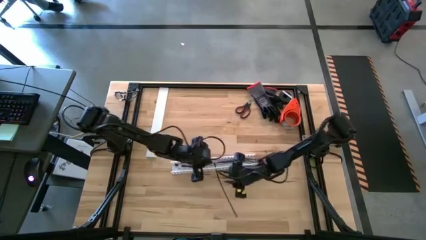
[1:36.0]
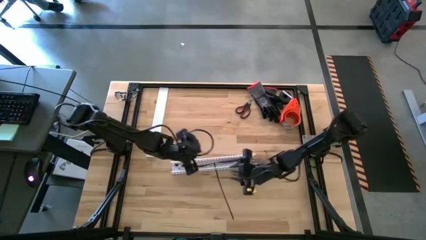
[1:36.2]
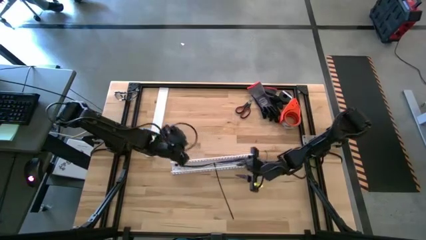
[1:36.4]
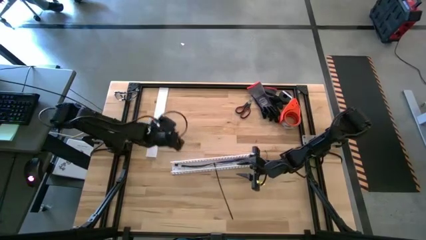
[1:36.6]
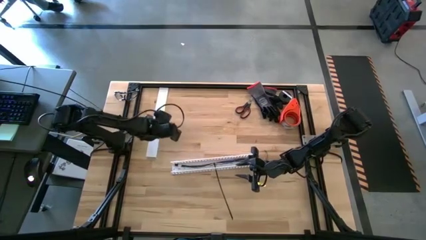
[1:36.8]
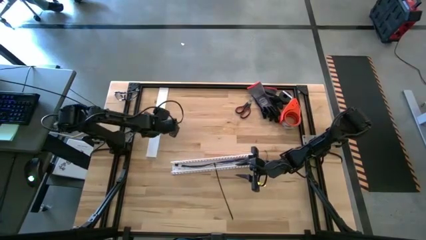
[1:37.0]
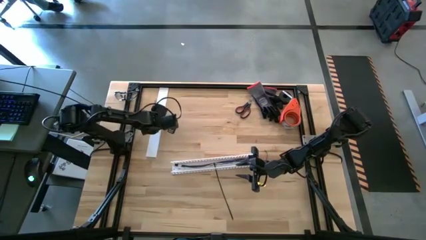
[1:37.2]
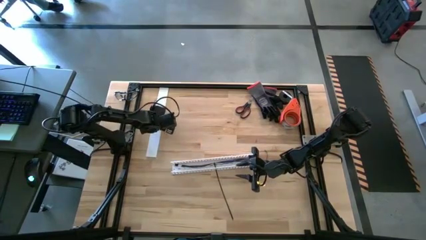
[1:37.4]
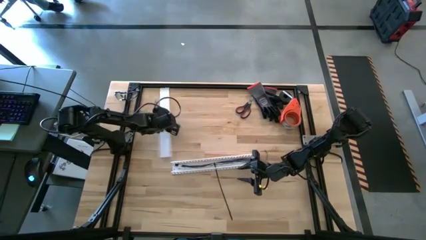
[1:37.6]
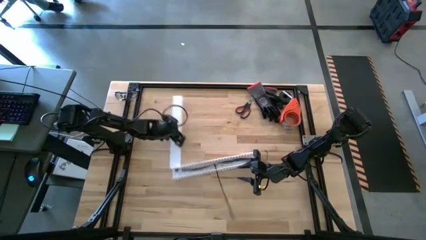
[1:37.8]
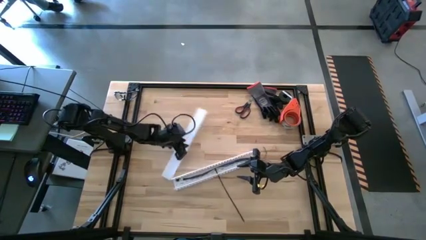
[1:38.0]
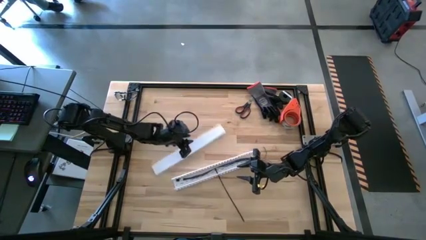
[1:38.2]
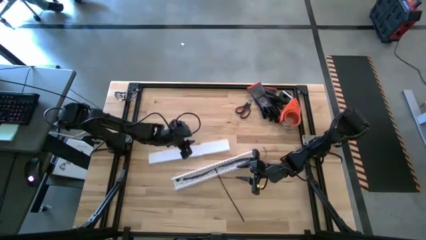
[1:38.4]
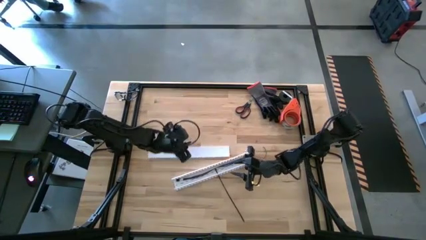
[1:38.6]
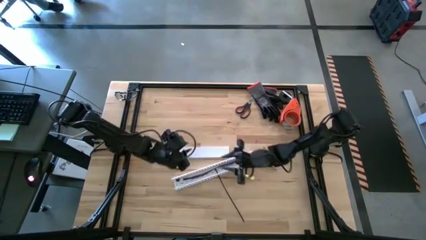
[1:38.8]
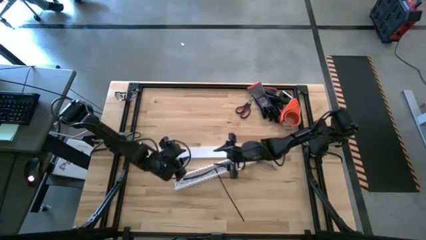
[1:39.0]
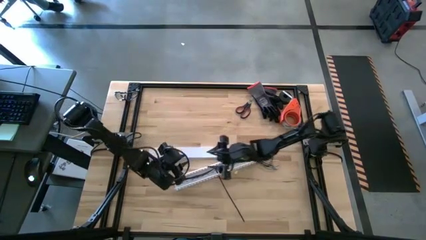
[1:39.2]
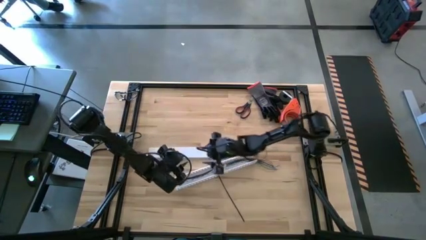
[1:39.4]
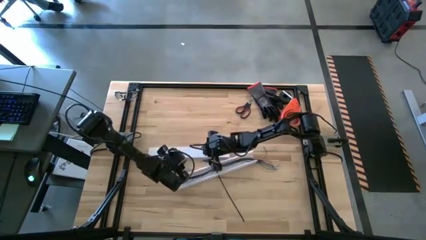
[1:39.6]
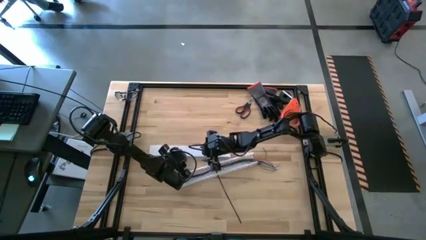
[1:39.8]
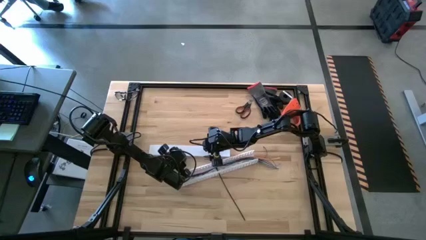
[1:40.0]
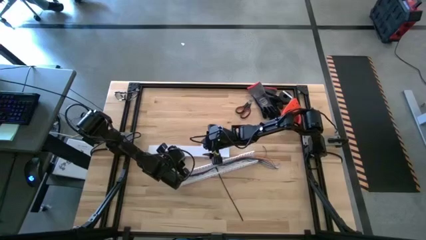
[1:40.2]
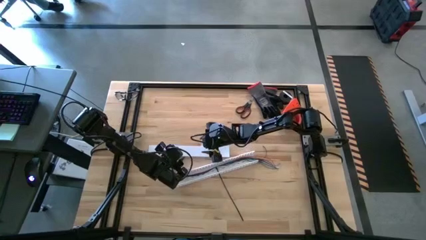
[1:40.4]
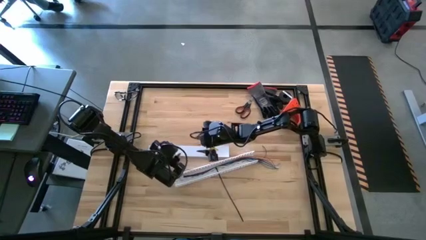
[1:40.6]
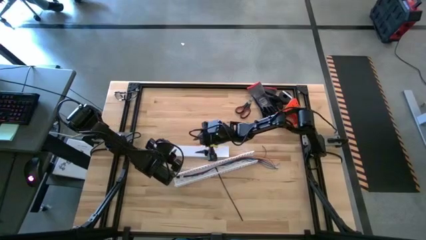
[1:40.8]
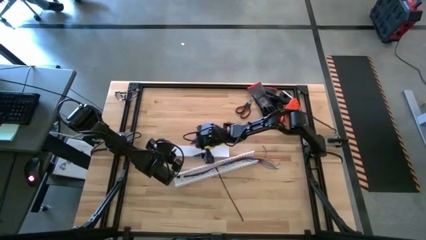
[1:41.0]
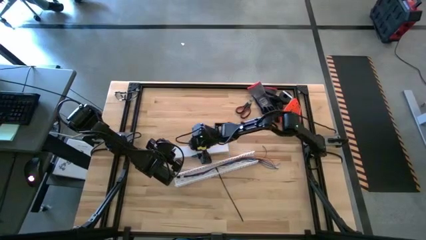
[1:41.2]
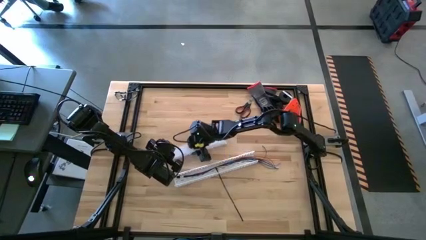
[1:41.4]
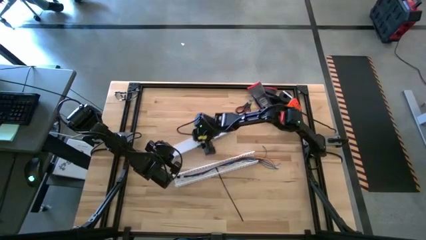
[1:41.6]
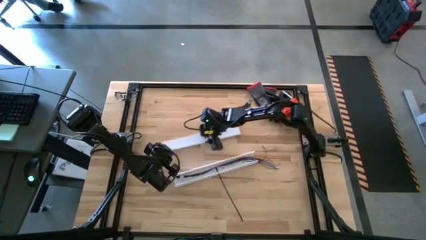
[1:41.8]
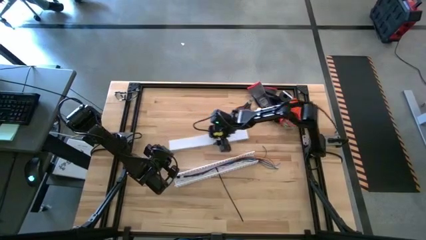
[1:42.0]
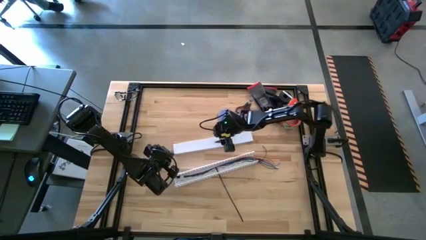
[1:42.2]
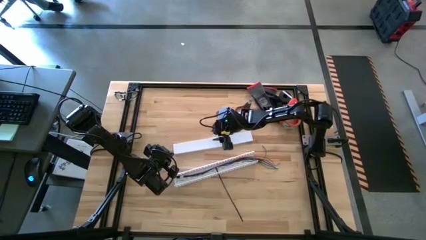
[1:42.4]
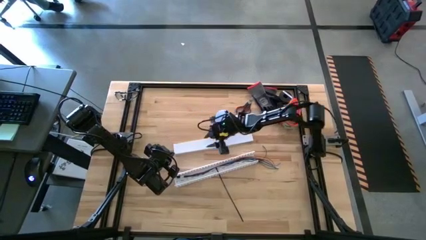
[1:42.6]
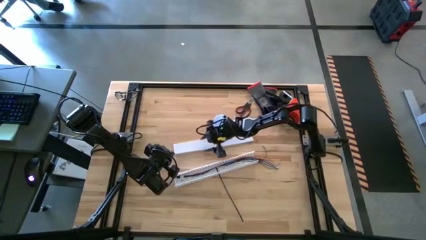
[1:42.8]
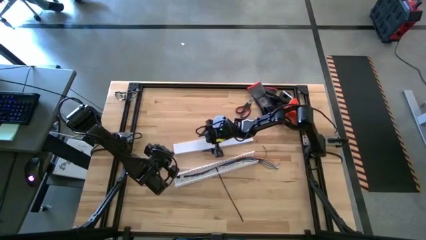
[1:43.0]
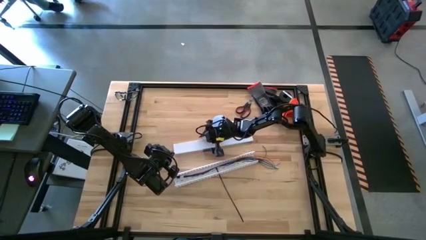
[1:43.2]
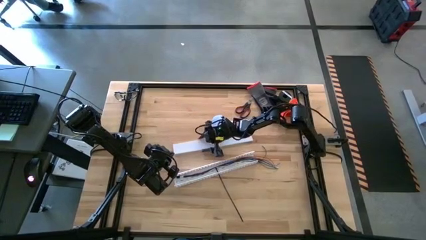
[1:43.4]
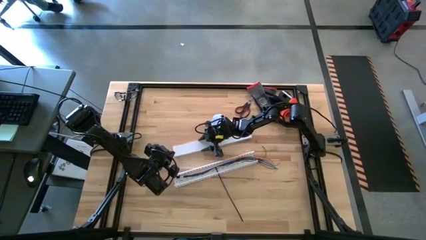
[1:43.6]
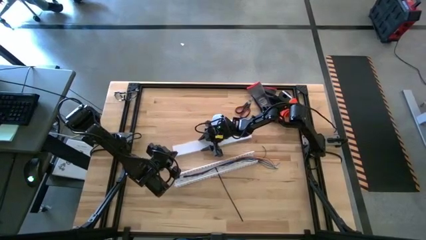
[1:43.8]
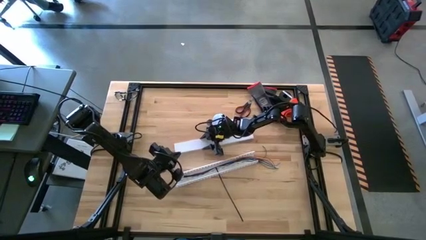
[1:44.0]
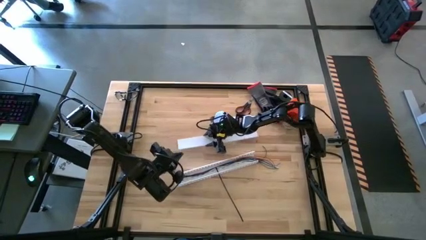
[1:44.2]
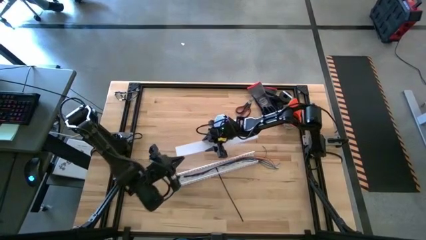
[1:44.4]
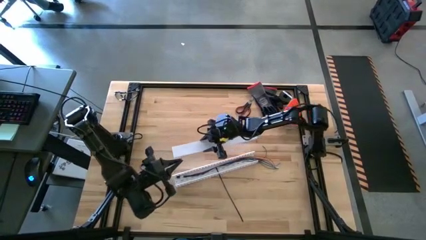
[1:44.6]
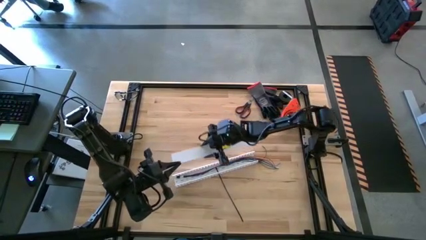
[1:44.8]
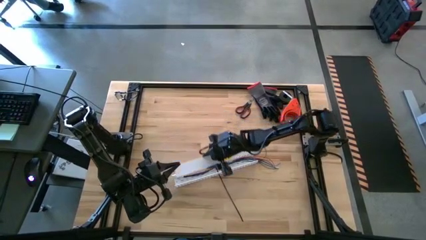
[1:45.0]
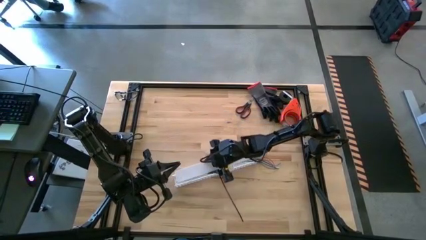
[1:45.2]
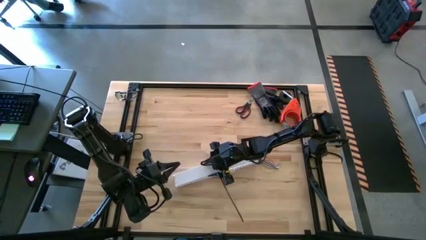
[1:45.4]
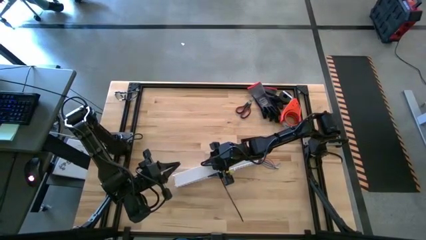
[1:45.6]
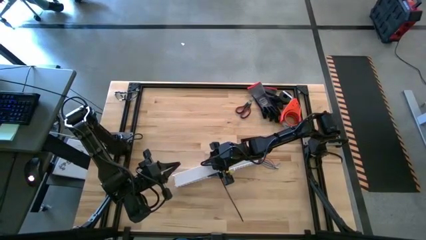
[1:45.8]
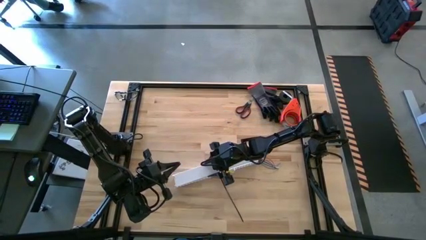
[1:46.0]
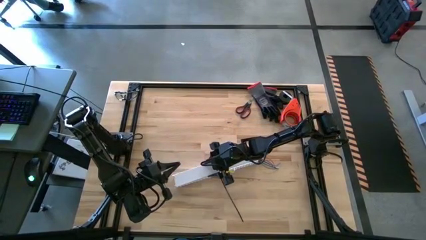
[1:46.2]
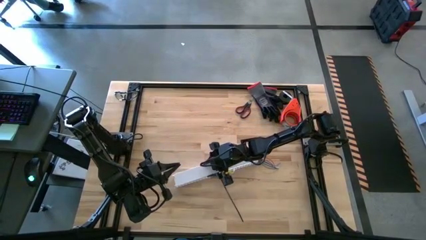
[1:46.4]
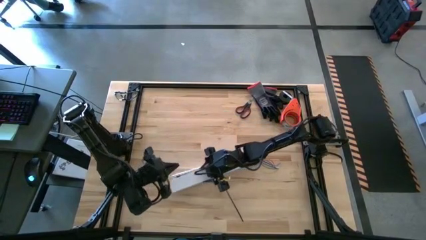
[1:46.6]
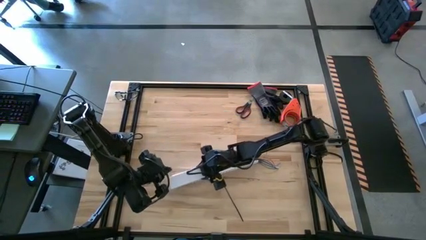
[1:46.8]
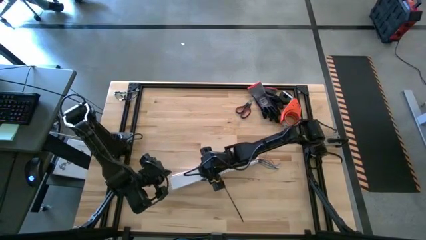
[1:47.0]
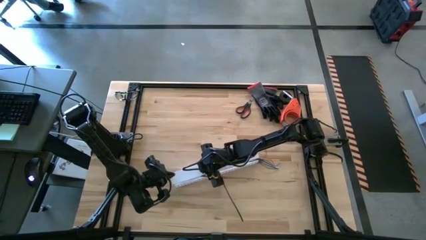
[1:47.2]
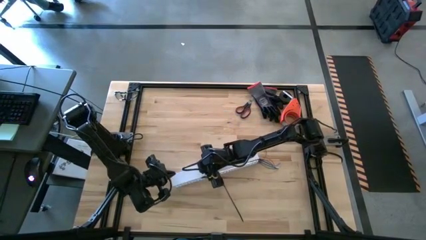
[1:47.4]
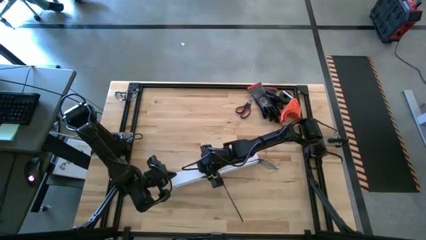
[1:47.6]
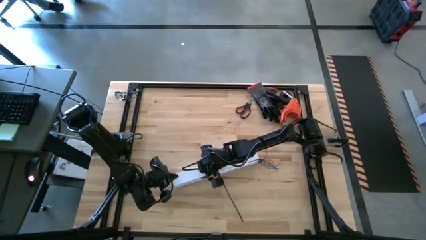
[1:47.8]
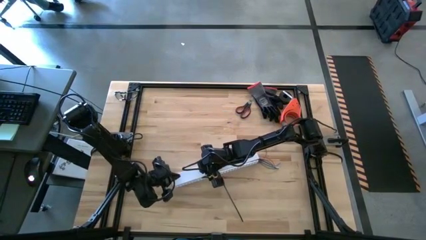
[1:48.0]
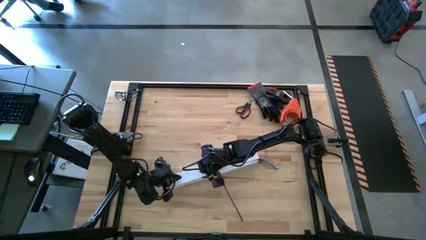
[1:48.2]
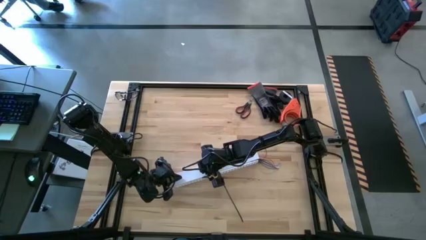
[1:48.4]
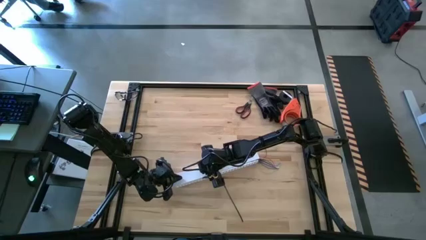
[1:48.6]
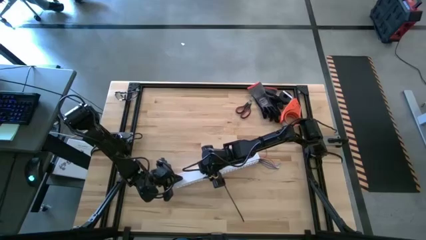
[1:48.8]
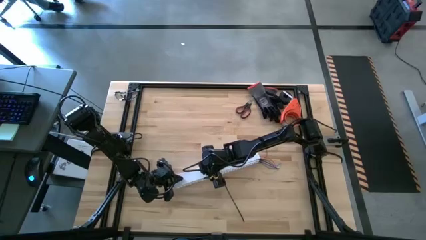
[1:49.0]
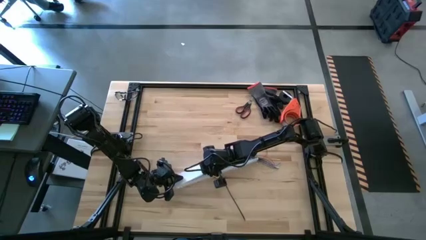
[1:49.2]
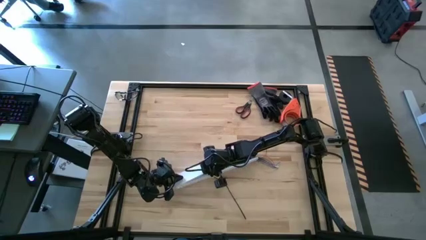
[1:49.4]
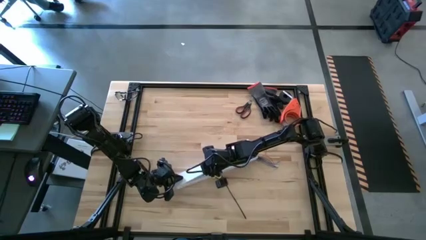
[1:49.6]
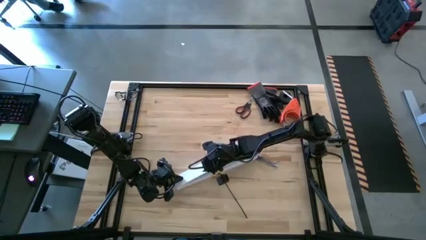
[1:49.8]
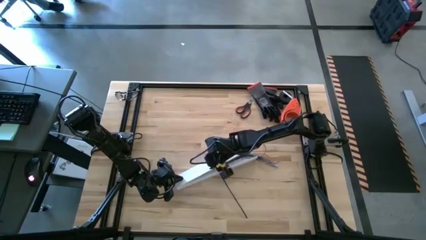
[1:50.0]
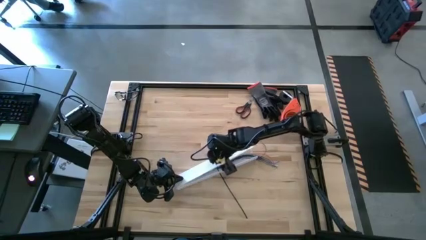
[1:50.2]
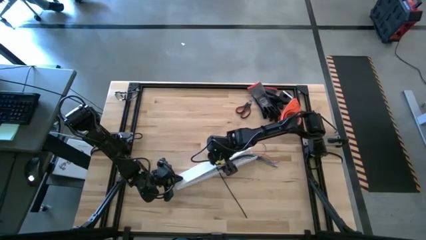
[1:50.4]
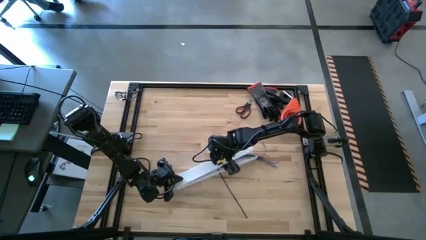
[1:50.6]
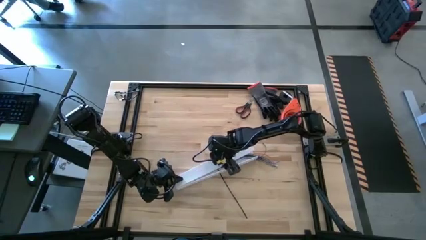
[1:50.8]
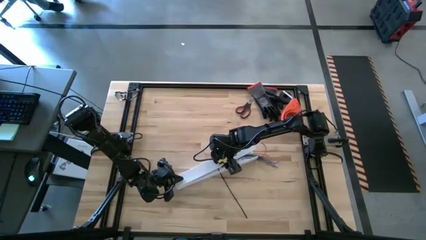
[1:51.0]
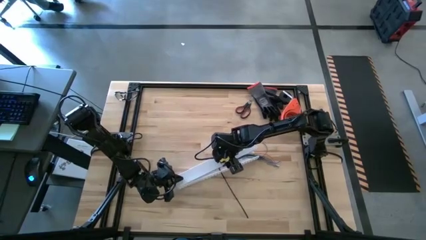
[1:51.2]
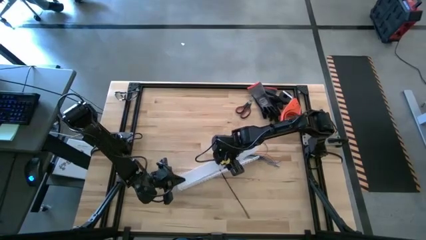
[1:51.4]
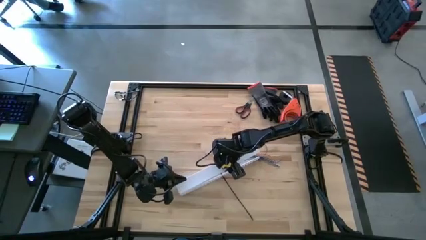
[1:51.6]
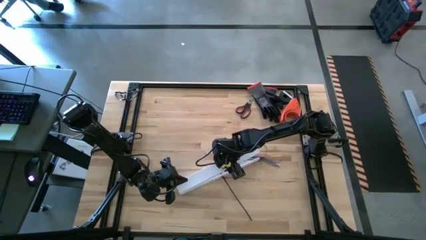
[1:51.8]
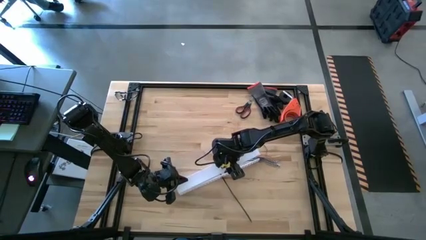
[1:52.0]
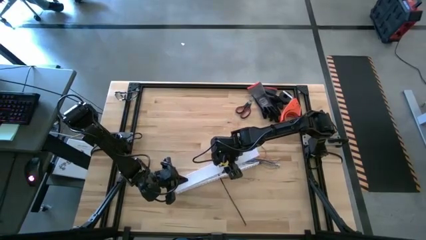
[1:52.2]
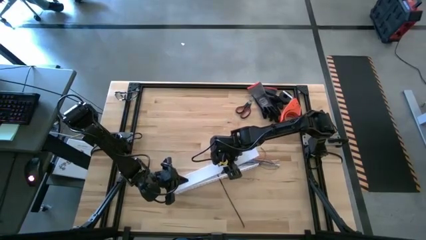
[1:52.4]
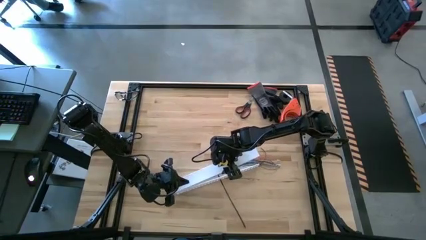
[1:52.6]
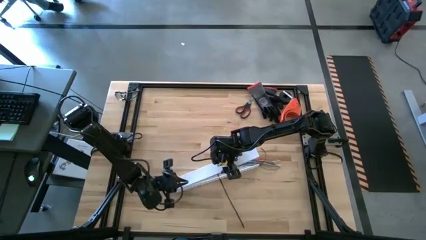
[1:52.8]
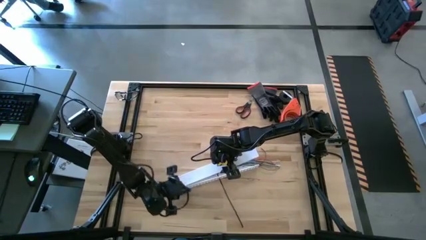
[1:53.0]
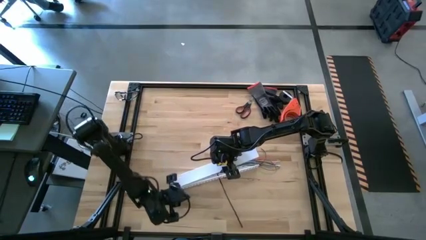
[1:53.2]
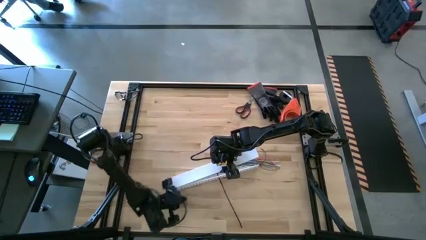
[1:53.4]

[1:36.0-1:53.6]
Task: Ziptie cables
Close the white cable duct
